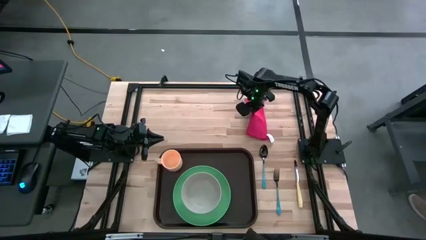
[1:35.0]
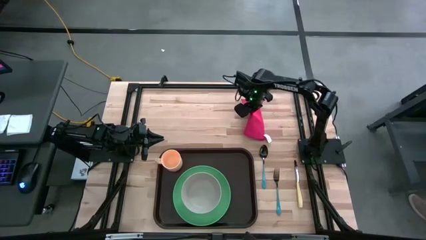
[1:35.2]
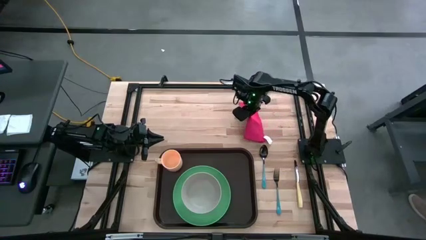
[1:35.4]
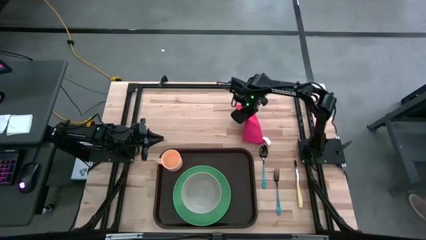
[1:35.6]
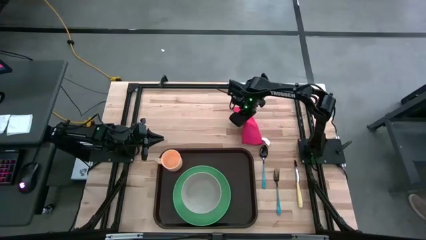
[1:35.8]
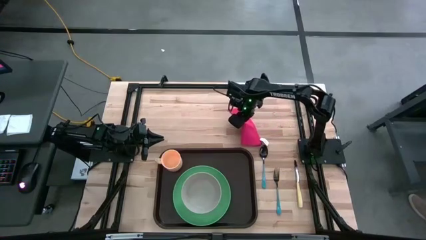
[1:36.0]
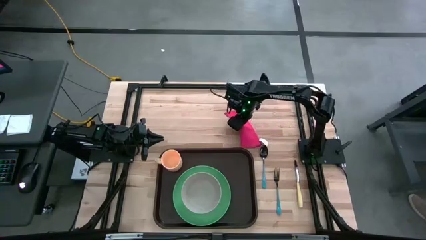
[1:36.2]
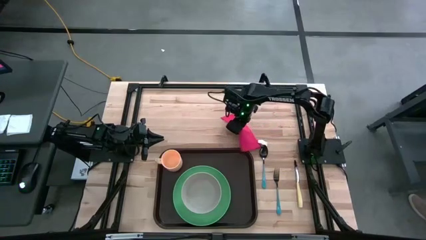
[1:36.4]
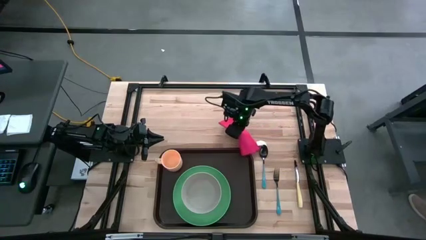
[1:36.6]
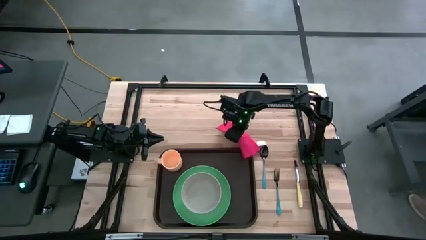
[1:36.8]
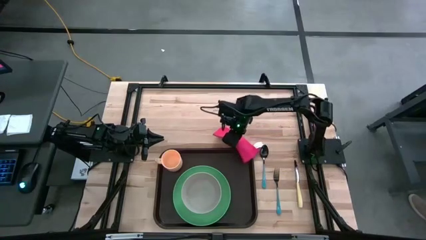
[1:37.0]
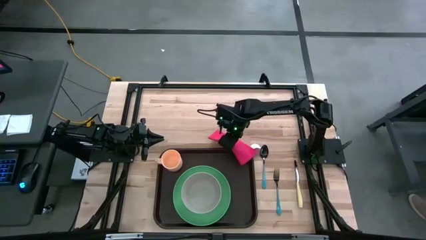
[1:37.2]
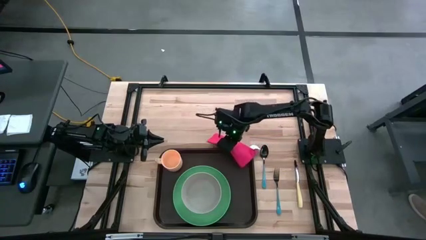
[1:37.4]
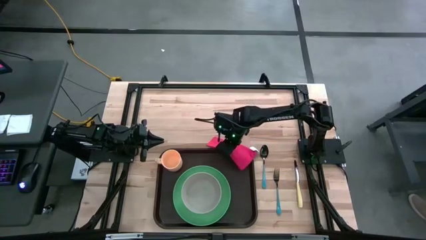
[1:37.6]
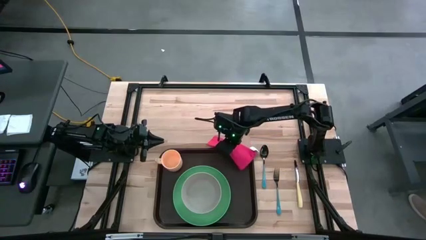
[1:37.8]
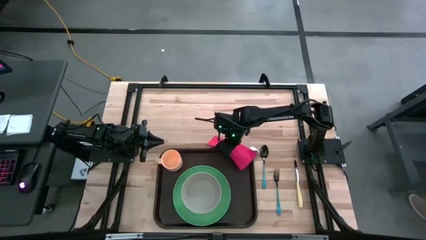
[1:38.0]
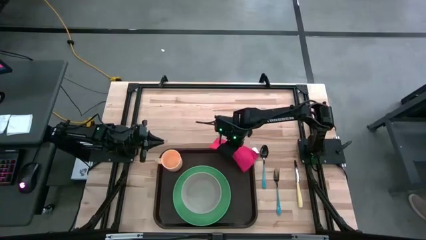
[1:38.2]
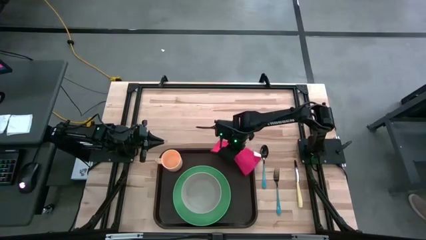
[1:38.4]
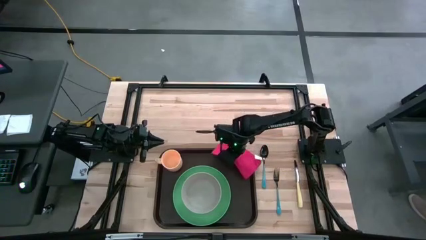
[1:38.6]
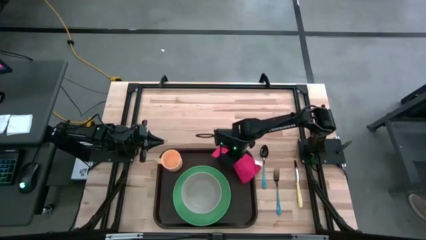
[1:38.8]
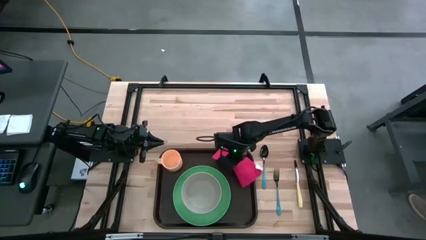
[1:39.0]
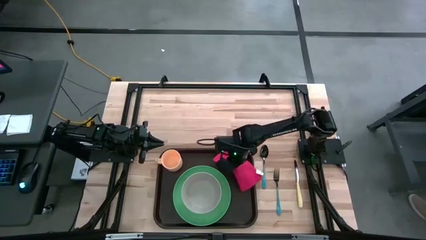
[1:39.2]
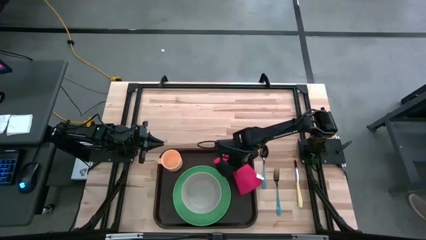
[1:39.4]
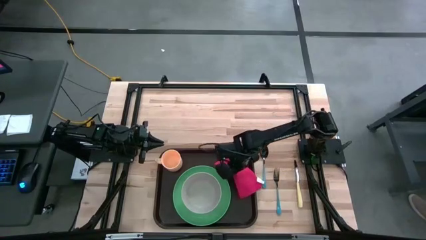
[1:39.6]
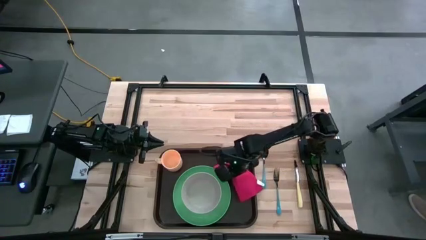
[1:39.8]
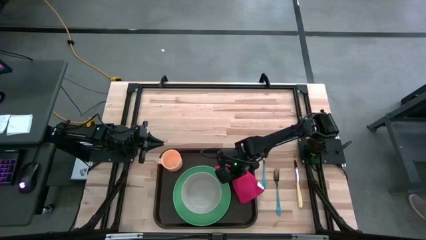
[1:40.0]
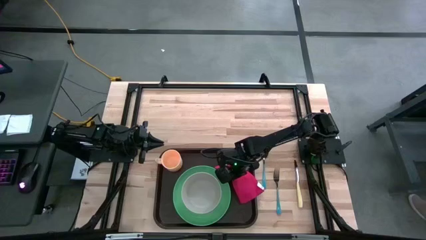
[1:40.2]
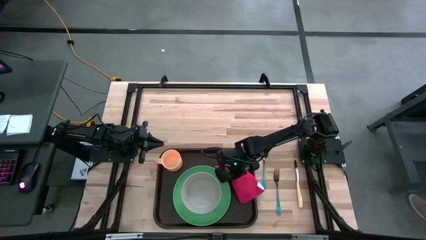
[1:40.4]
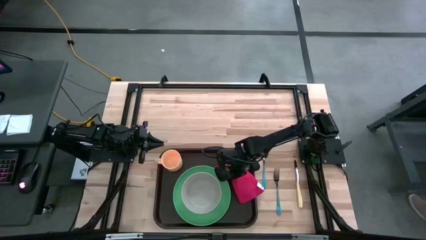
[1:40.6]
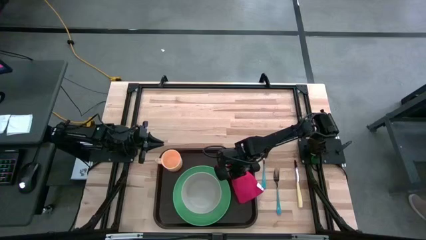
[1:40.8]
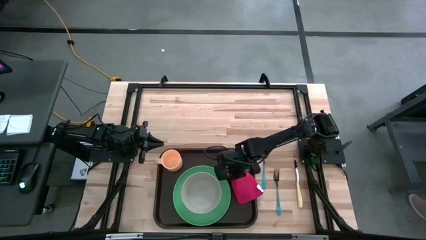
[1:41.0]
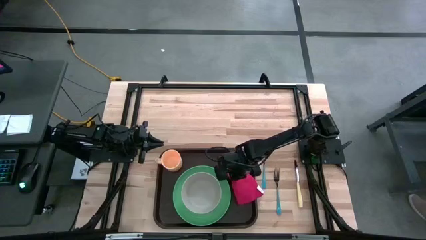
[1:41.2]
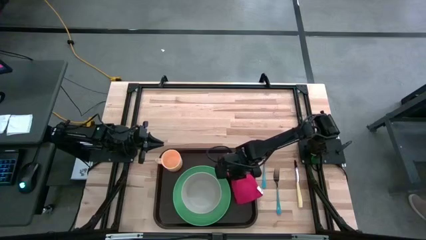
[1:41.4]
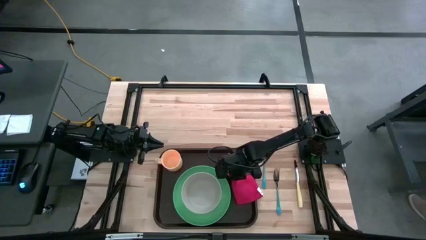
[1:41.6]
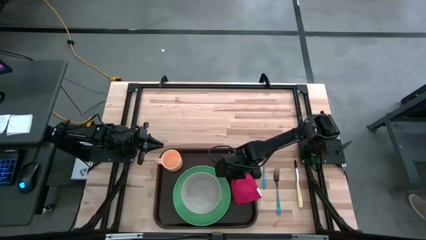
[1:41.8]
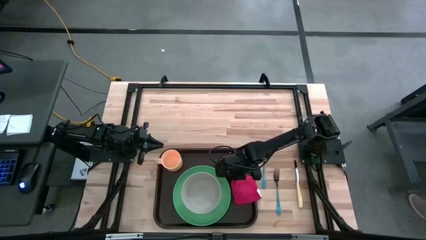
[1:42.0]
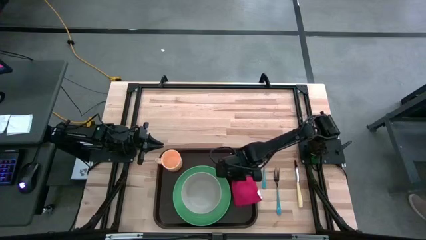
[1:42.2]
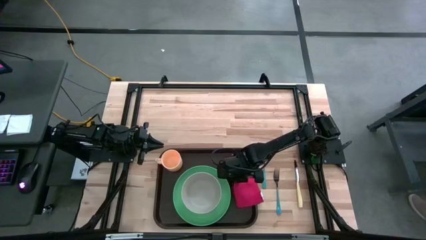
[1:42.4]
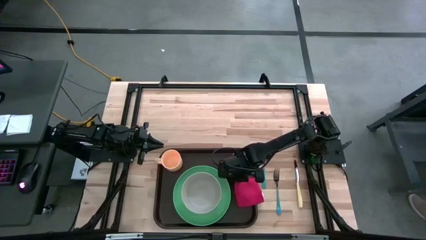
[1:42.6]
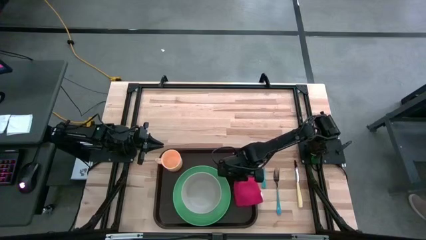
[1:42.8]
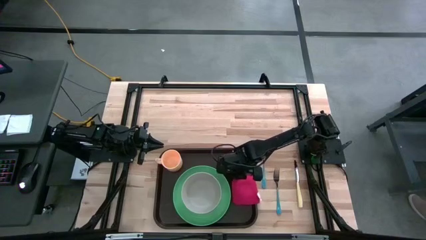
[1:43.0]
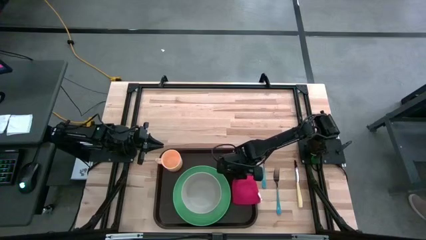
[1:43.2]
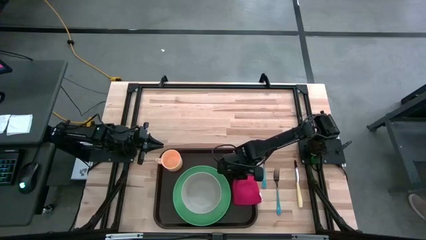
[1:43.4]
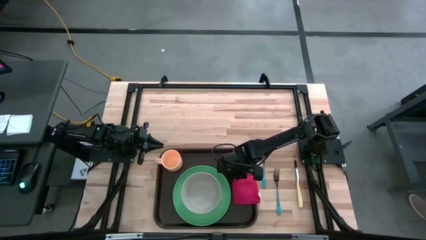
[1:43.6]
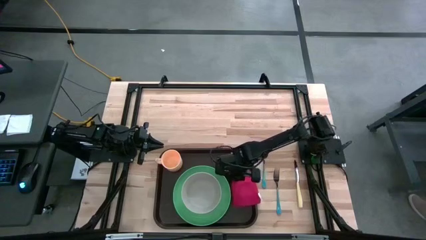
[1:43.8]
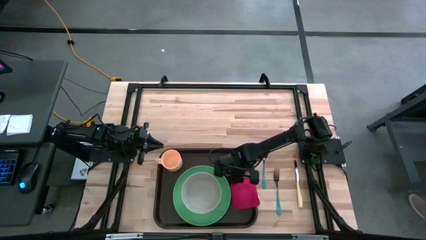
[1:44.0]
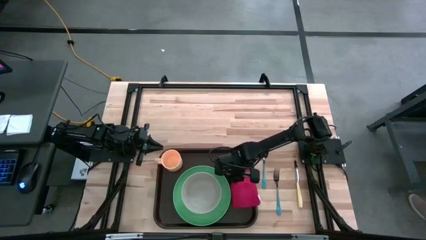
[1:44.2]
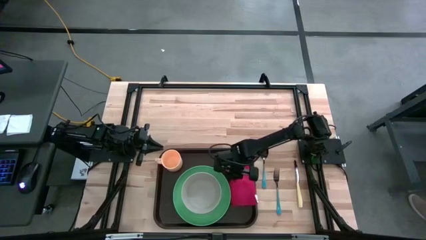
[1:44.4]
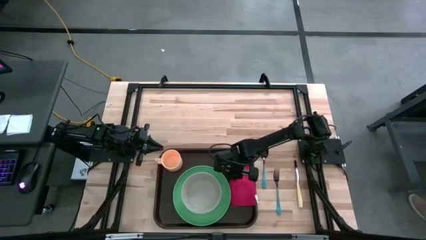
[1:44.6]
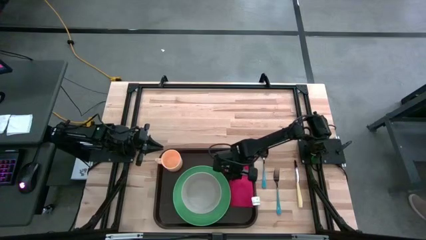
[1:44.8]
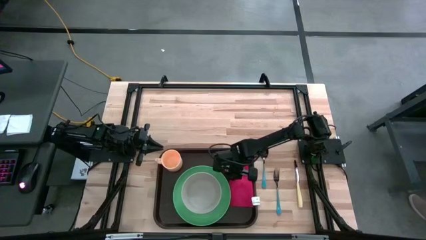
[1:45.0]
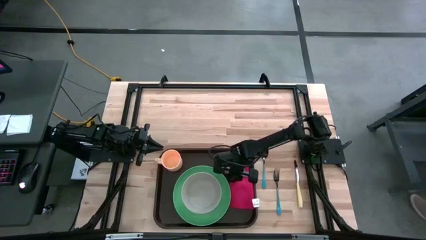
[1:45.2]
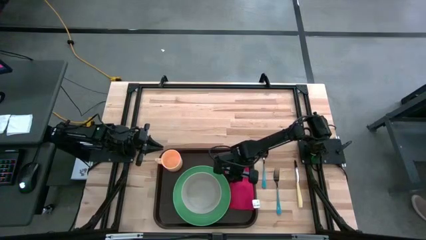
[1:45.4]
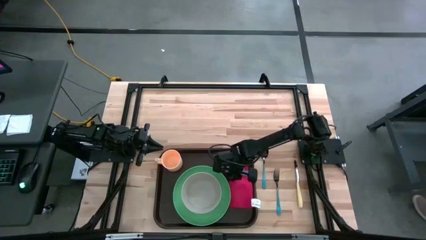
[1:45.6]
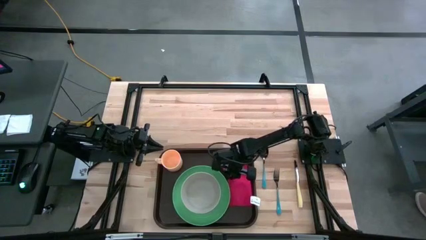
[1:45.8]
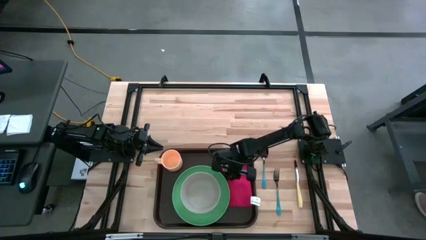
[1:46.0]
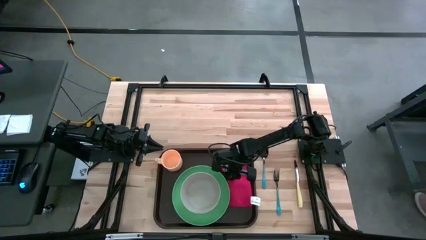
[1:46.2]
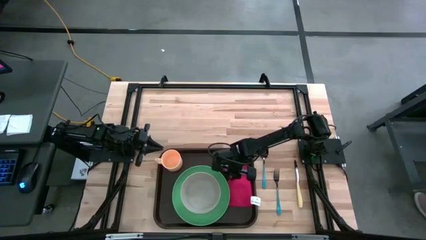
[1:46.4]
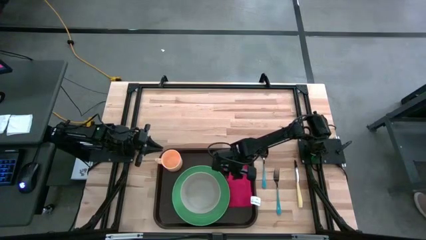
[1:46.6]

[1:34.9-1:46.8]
Task: Set up tray
Put the red table napkin to the right of the green plate on the brown tray

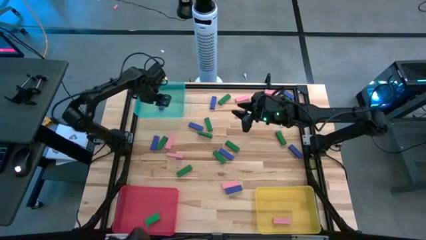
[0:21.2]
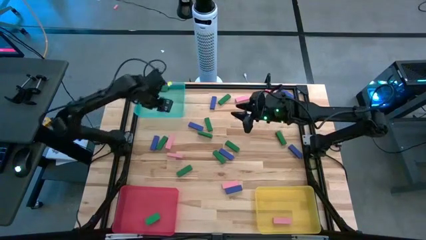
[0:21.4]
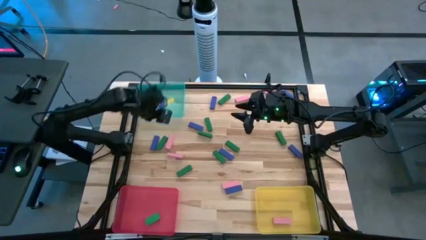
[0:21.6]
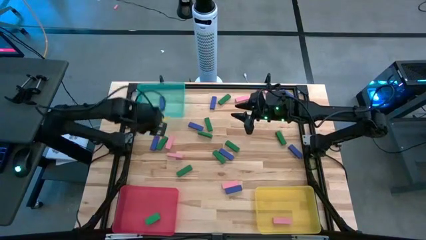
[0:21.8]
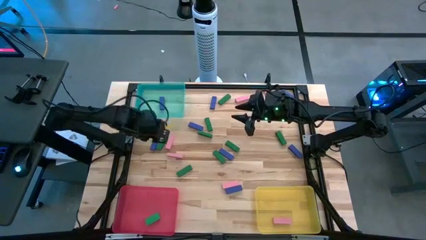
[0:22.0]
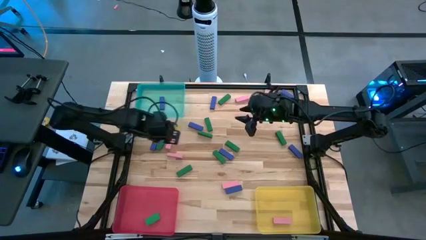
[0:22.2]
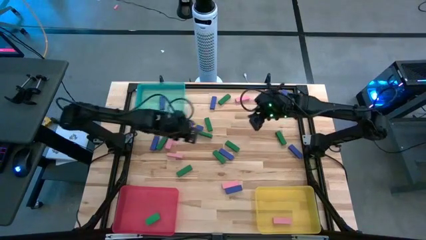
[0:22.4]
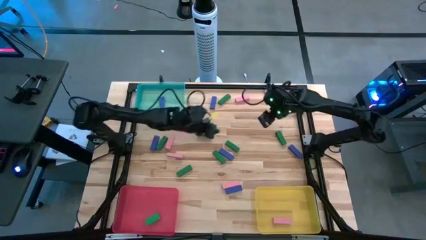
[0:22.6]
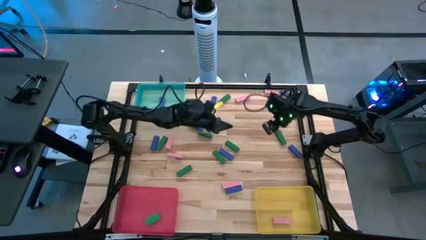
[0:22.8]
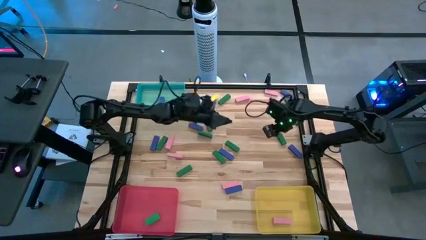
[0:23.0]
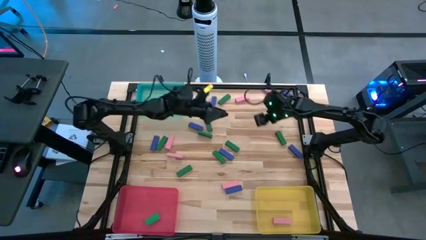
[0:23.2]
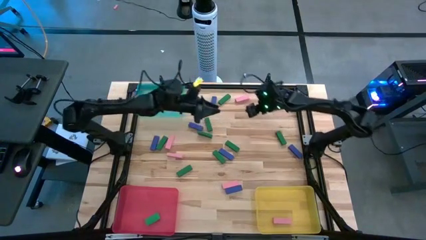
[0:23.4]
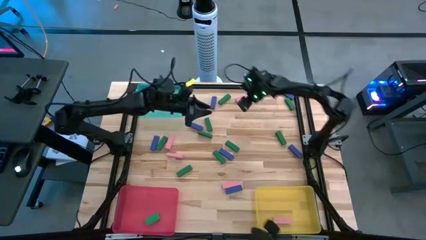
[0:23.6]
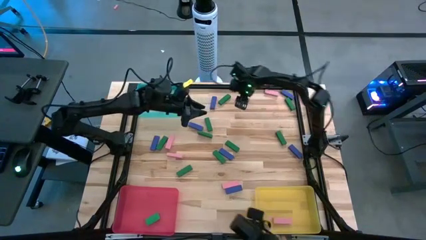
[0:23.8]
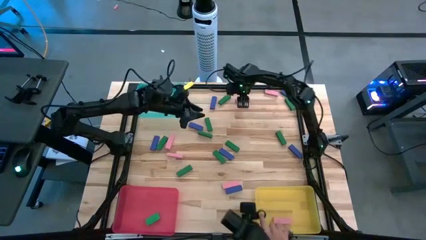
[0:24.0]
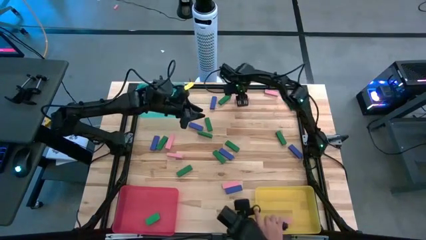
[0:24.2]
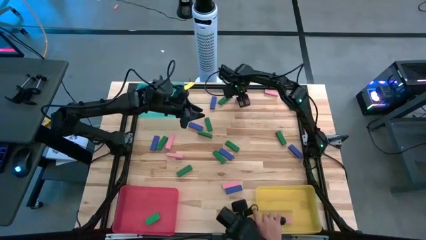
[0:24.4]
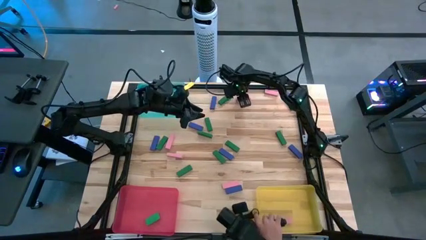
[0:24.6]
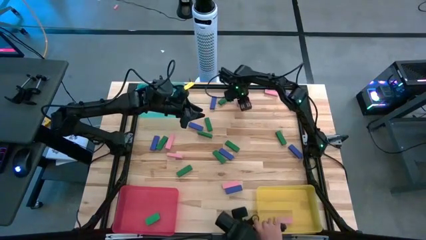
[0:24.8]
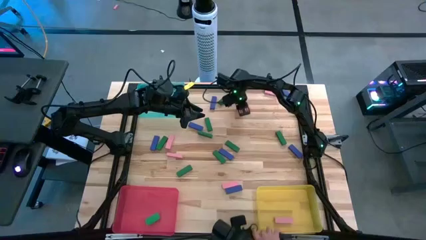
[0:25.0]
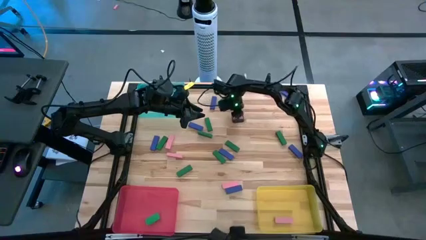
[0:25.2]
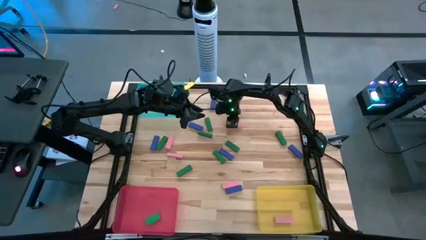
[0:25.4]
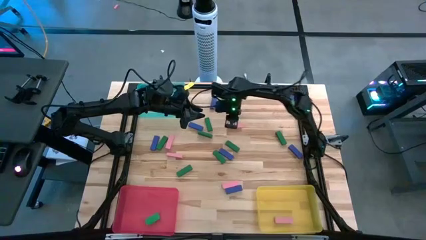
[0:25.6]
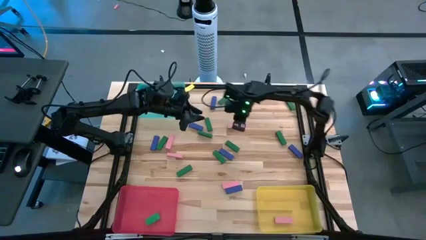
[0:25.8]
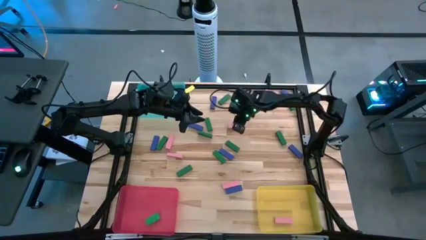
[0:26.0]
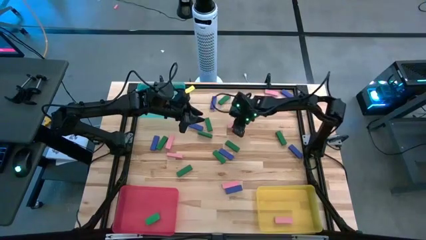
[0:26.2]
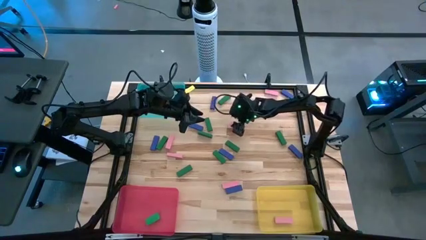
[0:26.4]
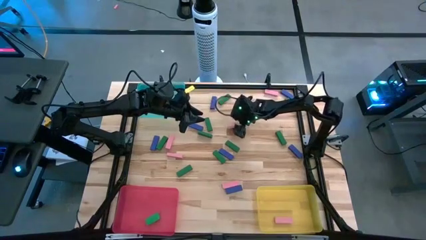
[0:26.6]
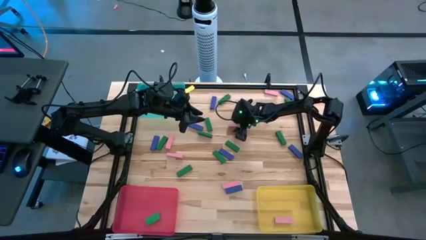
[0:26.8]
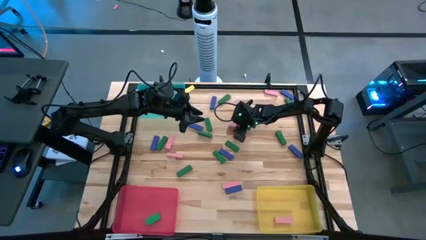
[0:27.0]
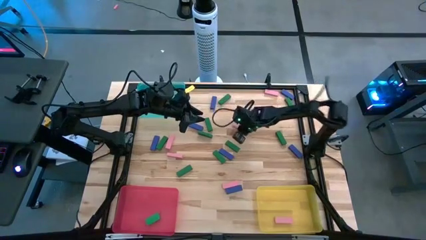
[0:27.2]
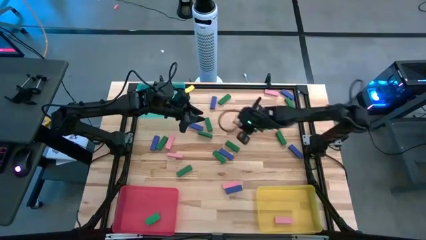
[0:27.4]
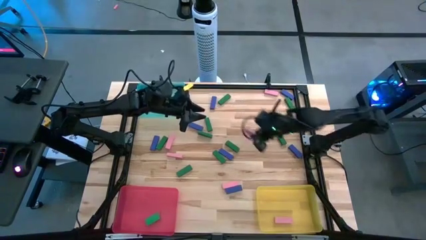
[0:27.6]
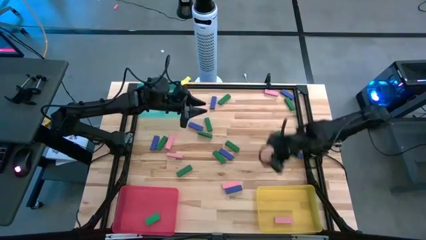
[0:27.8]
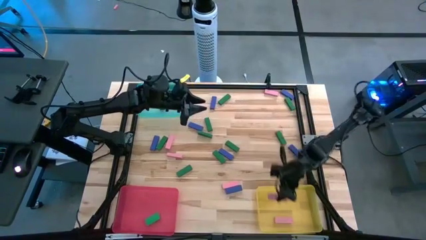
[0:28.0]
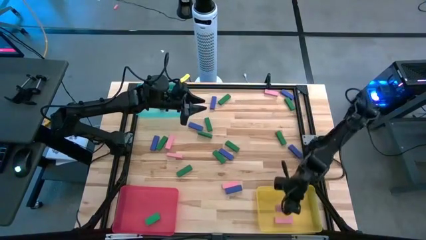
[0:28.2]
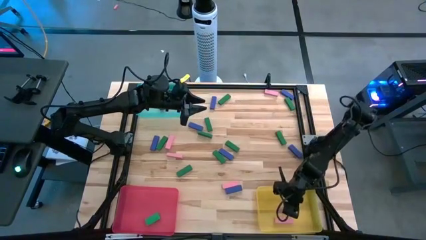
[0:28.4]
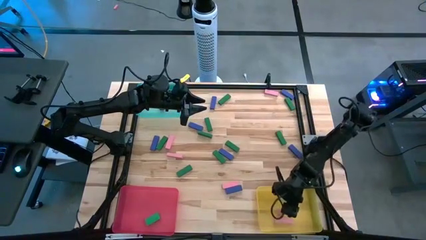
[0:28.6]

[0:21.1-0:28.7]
Task: Sort blocks
Put the pink block into the yellow bin
